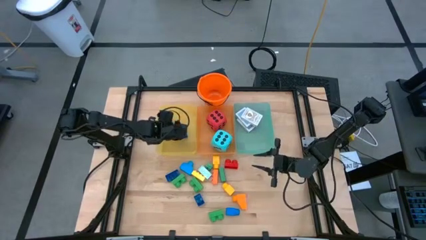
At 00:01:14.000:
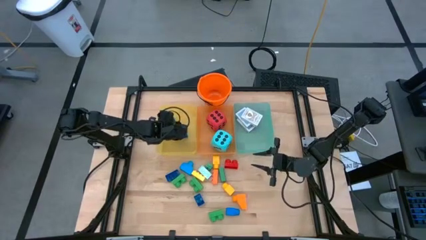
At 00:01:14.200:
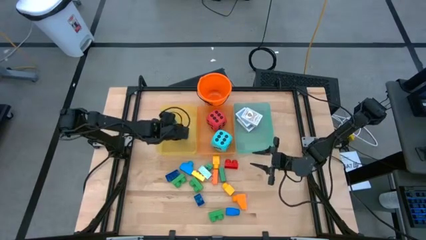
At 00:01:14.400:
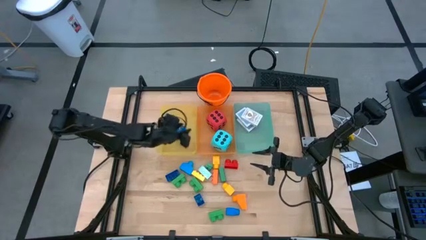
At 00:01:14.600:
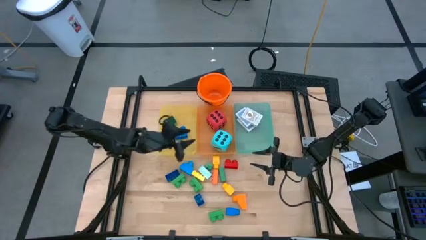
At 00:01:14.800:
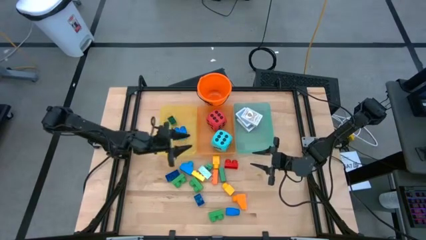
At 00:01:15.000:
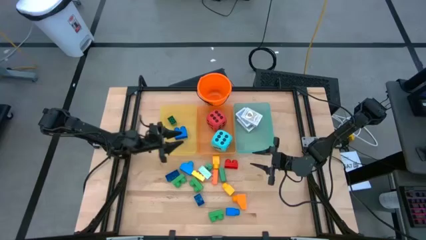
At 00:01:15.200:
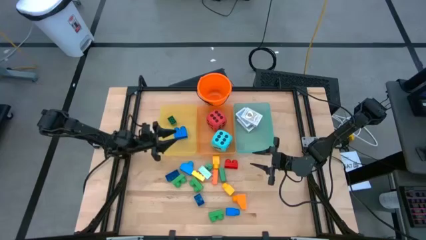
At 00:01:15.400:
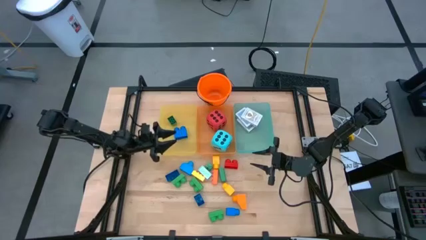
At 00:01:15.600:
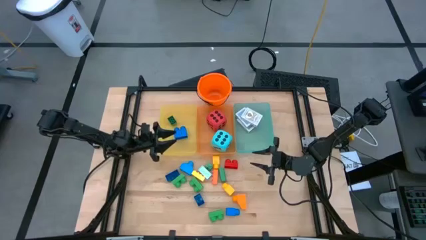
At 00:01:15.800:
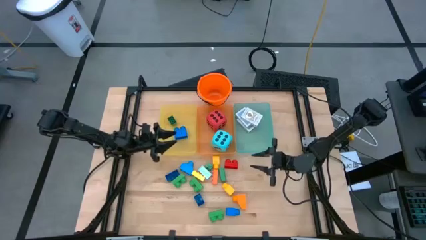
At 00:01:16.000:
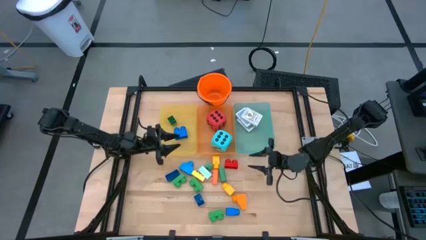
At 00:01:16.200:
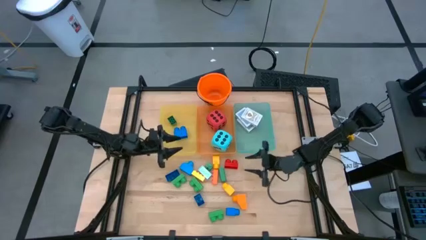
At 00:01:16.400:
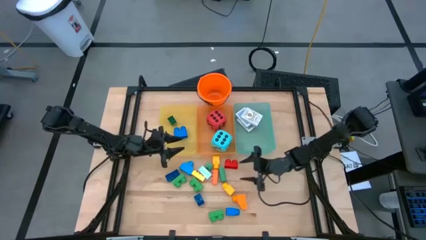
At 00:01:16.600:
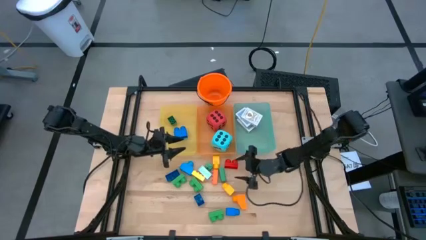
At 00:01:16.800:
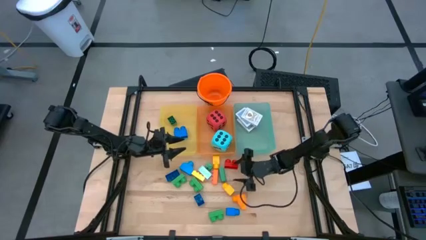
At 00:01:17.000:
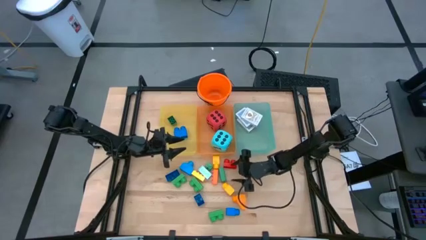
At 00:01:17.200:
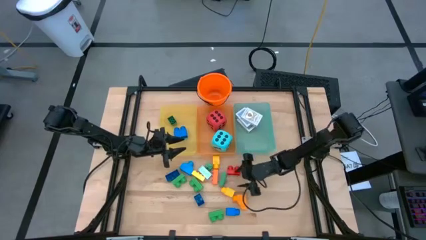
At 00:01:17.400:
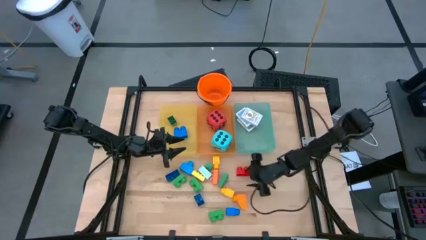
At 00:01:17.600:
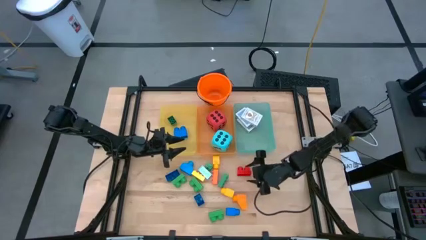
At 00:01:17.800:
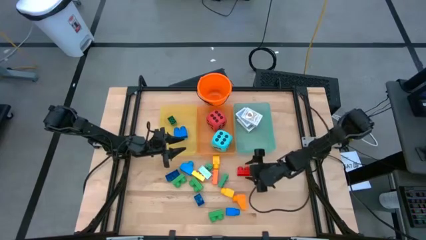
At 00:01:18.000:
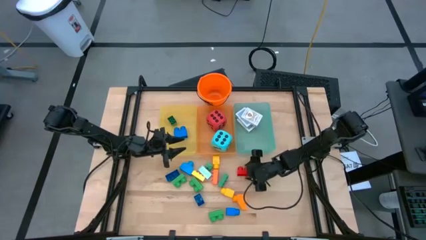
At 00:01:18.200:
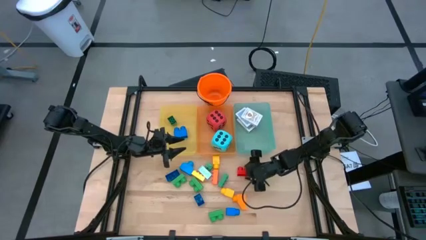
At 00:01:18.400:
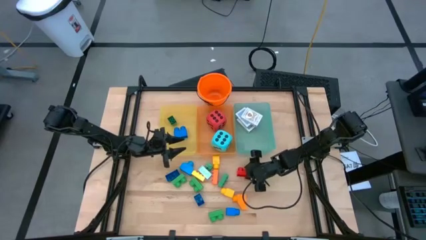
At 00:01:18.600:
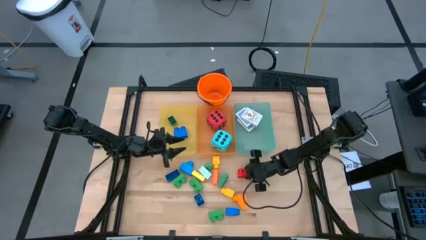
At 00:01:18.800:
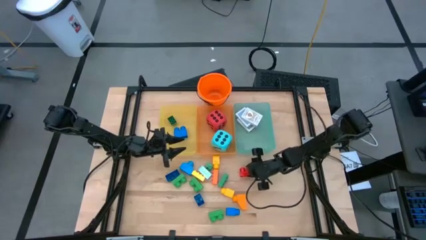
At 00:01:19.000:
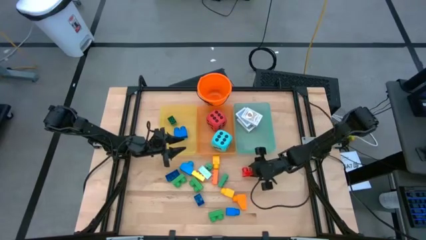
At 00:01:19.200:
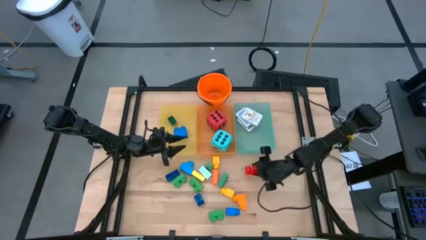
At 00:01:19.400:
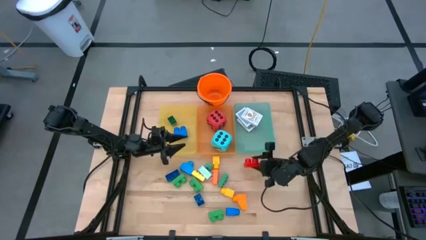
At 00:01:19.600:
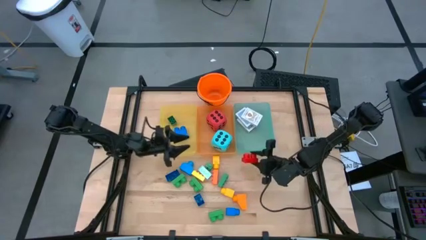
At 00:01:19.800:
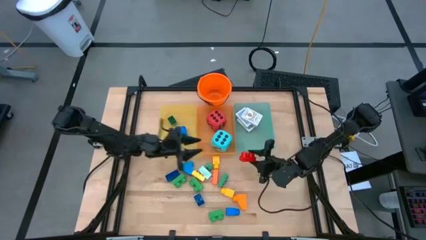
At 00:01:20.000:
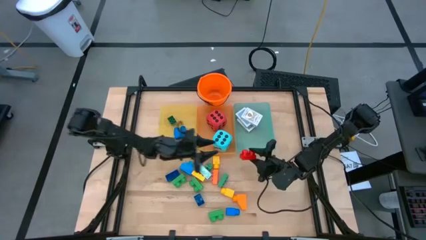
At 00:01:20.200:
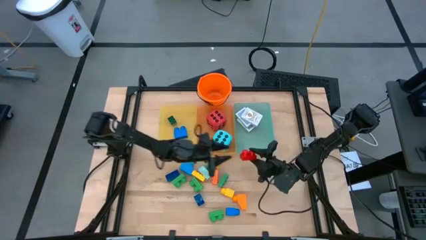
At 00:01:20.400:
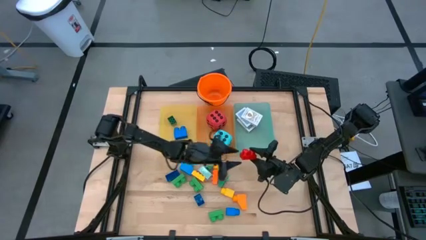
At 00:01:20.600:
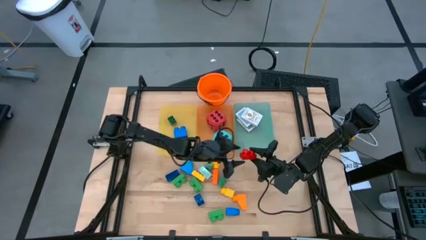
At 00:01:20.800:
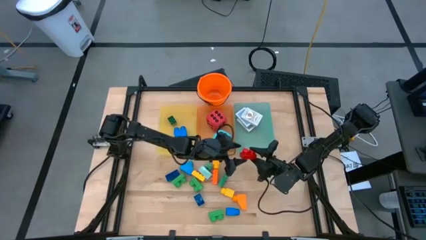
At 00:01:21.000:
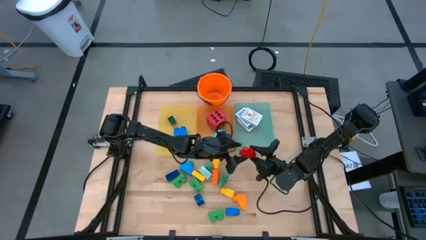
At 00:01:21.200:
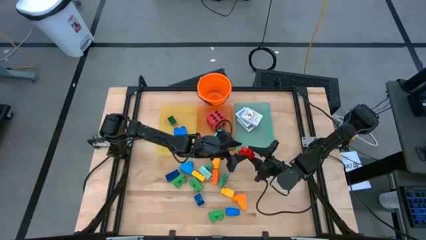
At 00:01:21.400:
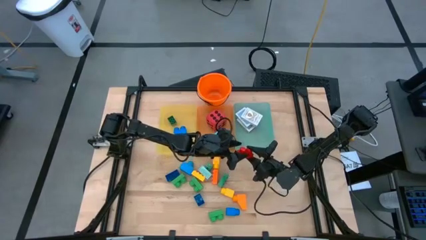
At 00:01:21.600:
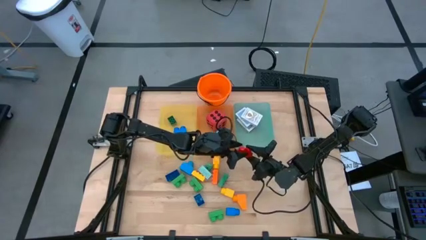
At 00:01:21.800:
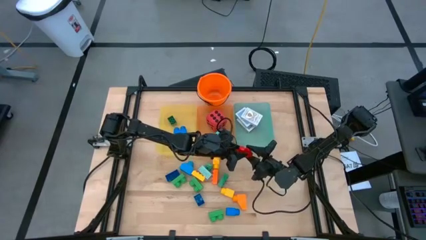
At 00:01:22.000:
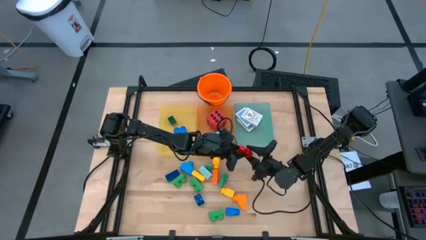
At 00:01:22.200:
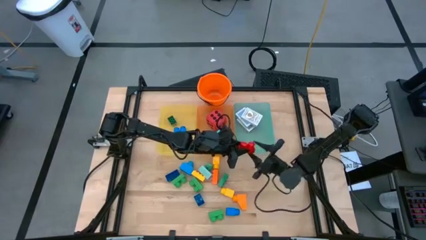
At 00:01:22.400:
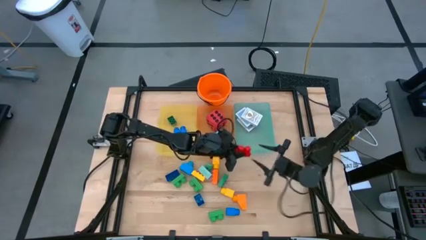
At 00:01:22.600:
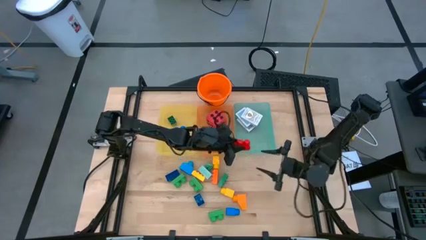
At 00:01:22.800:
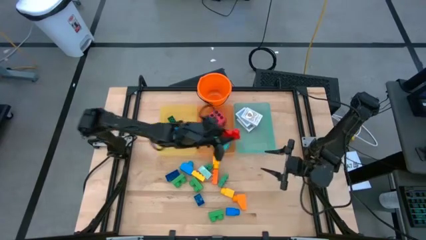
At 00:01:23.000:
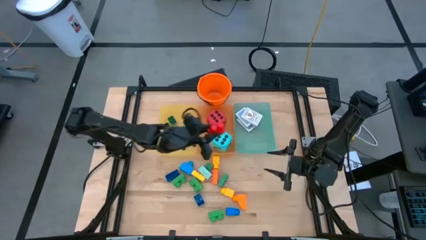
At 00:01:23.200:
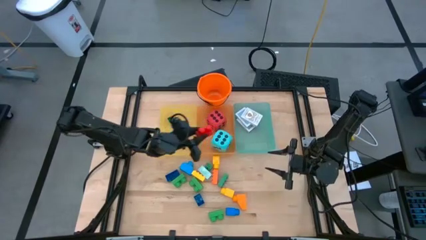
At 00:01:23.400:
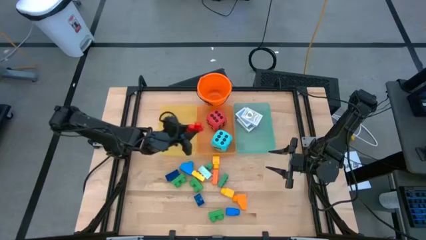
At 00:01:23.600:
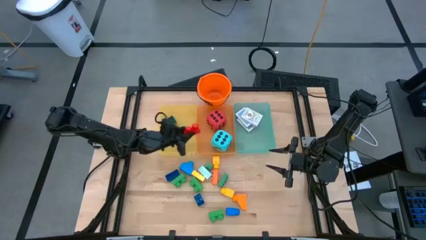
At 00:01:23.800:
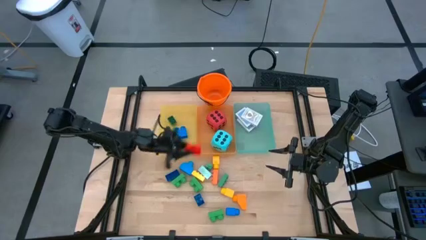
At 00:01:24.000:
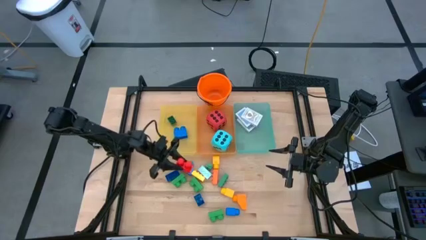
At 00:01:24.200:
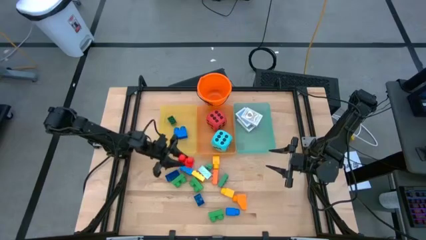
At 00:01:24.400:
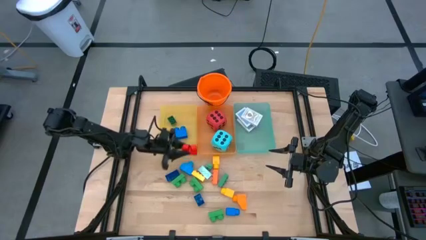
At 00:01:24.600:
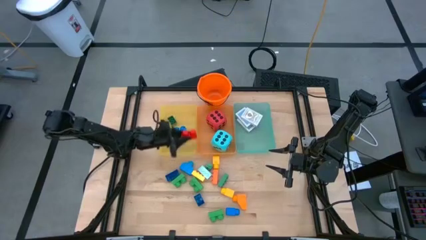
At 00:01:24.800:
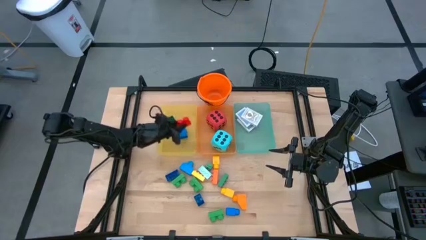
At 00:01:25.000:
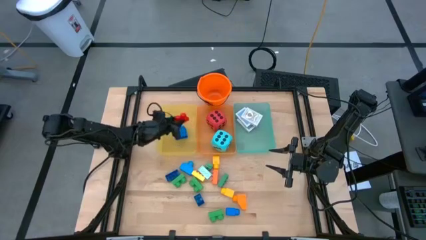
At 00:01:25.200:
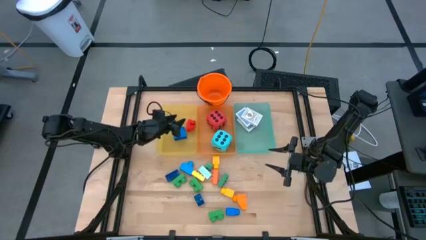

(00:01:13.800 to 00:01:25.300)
Task: Pick & Place Toys
Put the red game piece into the yellow bin

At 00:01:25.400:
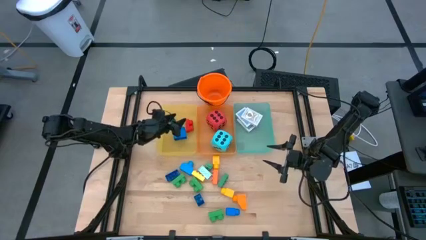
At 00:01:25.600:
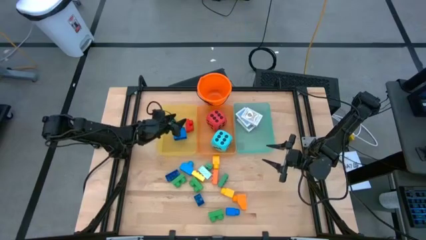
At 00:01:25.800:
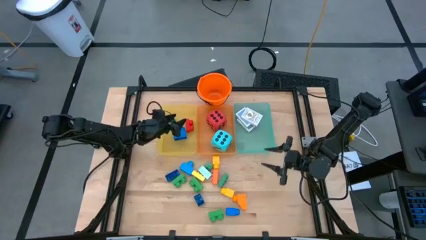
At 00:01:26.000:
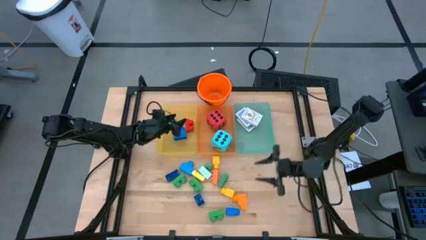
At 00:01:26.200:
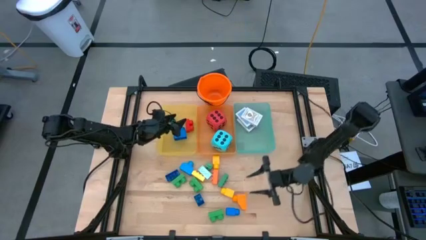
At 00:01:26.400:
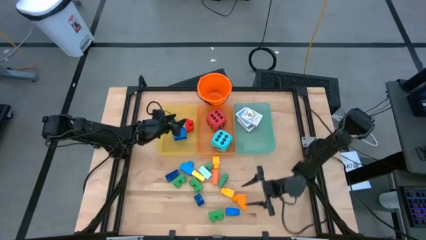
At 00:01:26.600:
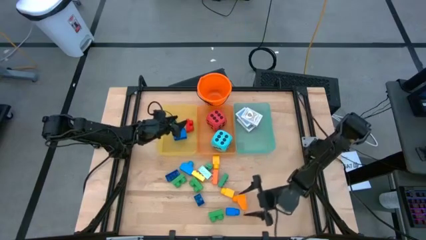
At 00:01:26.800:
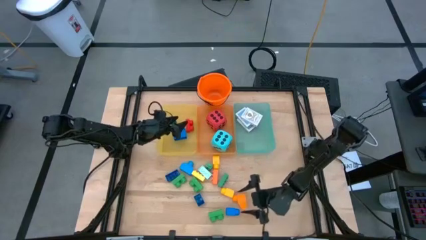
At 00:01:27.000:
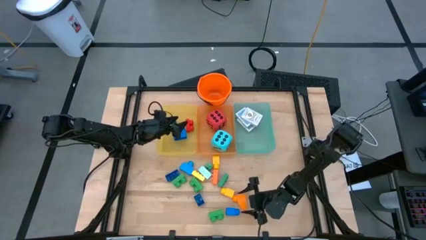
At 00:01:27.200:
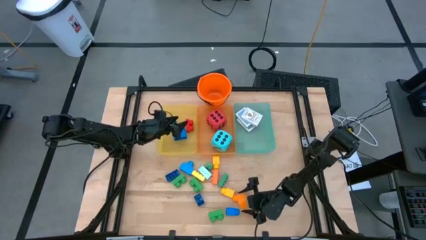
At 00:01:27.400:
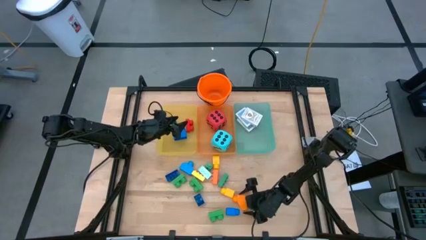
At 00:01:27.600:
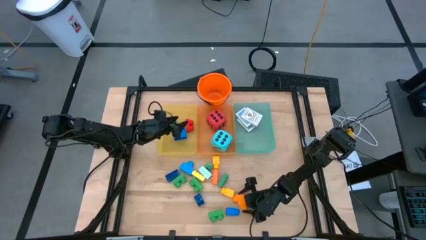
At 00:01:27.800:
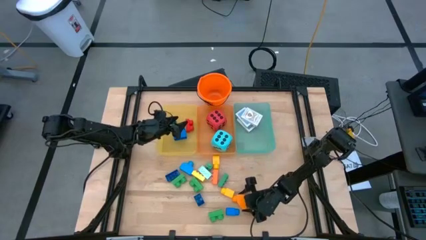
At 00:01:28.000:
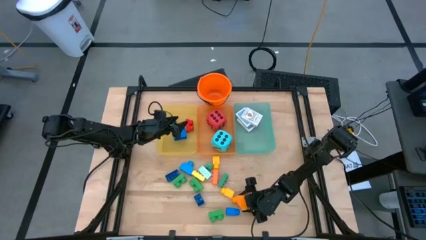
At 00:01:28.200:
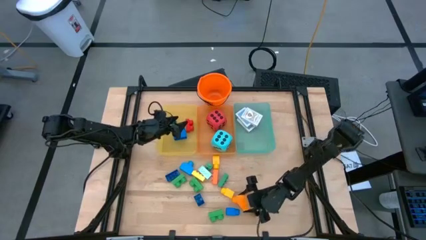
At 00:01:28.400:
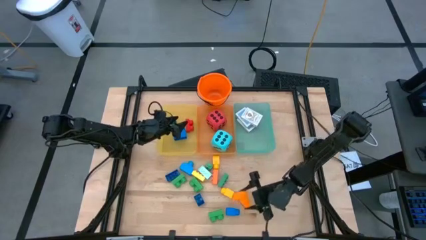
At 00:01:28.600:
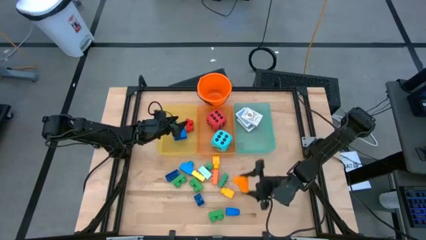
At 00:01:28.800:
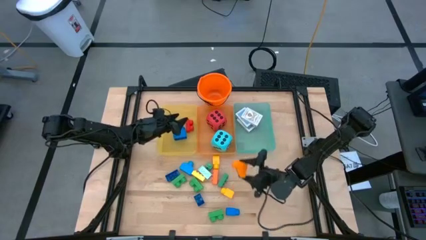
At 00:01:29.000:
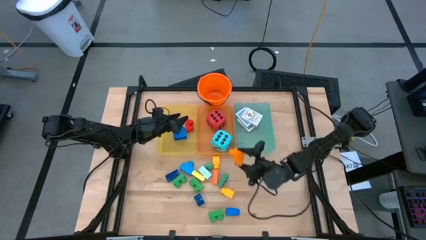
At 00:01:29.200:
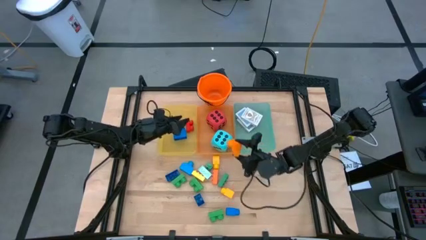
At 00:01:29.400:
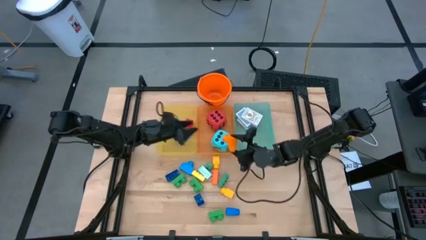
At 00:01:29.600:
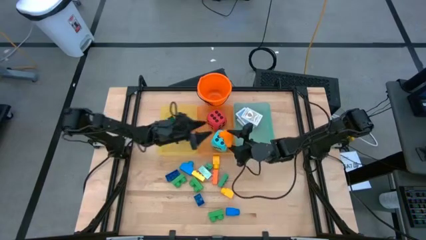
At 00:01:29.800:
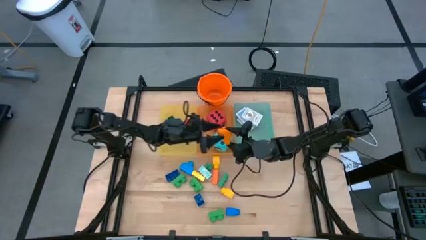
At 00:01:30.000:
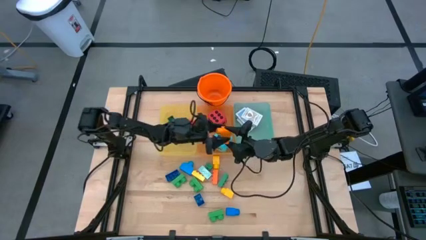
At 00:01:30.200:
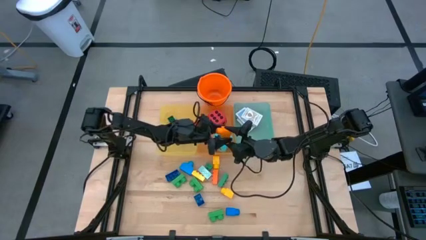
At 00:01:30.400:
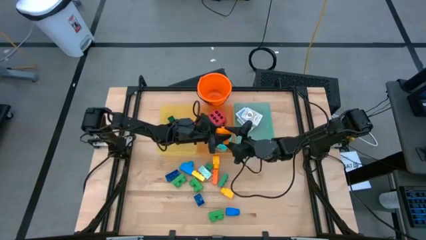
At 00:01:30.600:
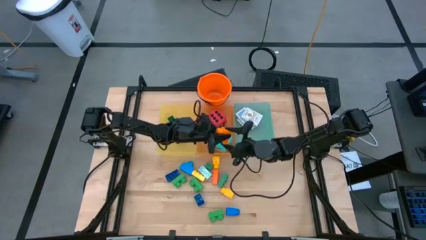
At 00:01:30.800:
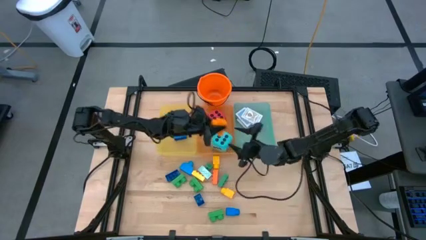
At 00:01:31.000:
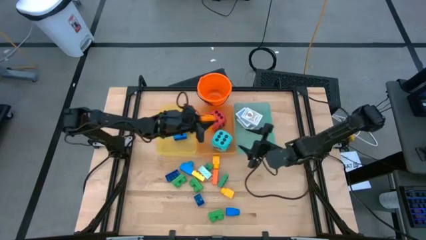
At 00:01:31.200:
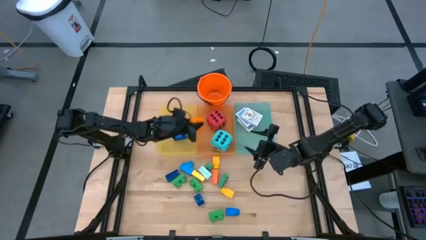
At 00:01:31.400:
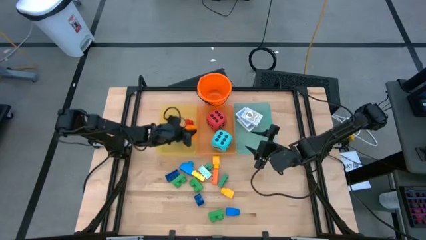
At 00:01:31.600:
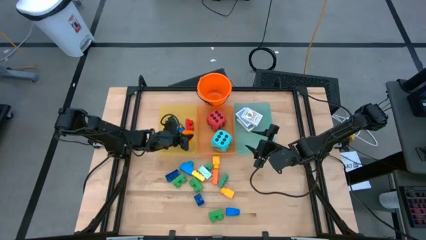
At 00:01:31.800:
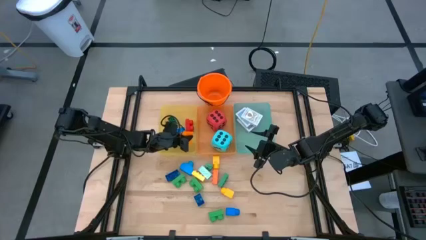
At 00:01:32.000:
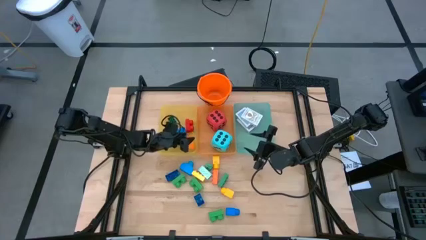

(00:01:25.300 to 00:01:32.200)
Put the orange game piece into the yellow bin
